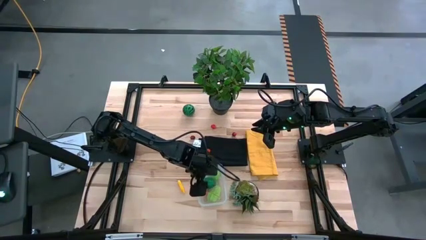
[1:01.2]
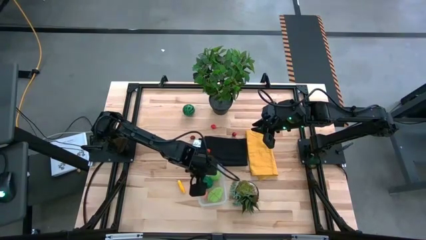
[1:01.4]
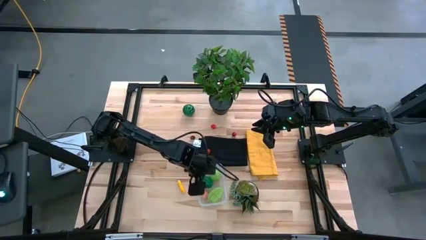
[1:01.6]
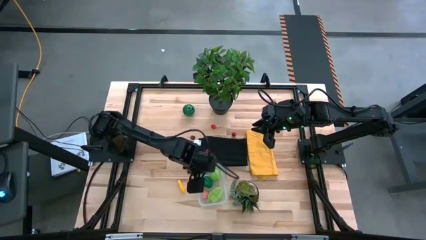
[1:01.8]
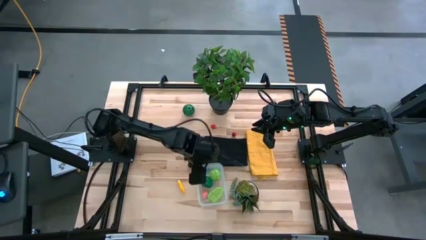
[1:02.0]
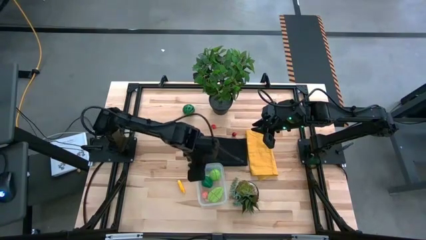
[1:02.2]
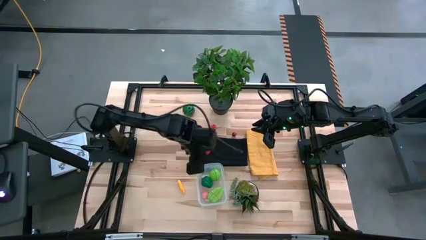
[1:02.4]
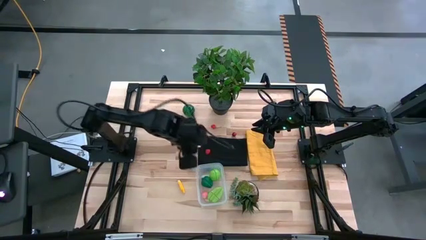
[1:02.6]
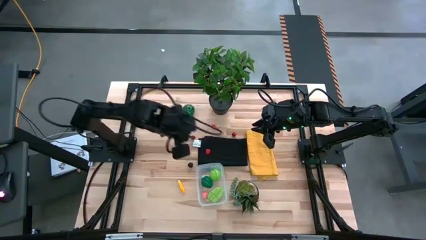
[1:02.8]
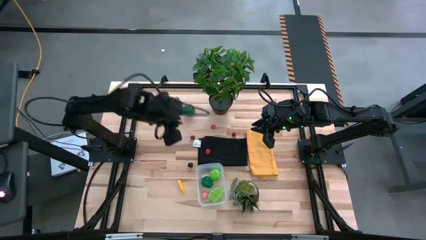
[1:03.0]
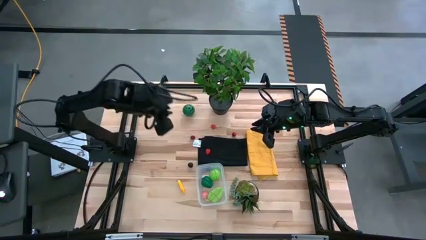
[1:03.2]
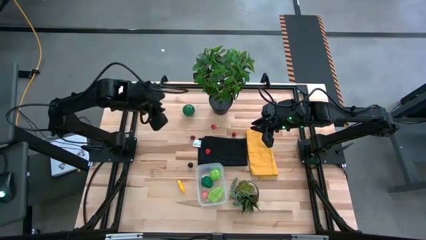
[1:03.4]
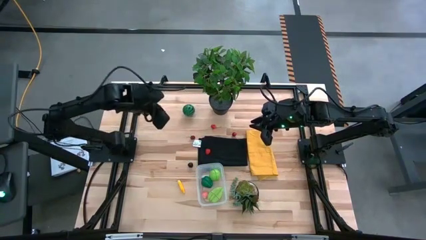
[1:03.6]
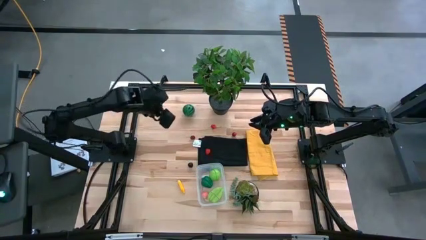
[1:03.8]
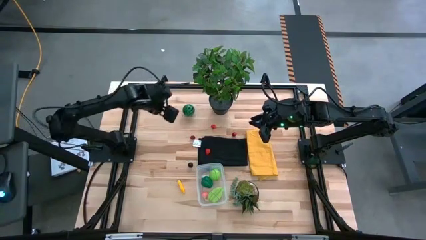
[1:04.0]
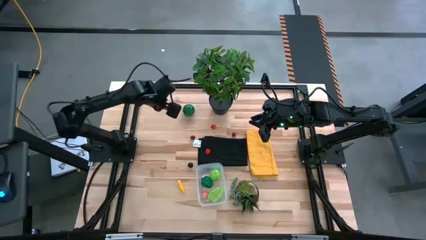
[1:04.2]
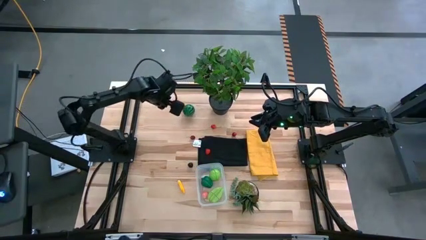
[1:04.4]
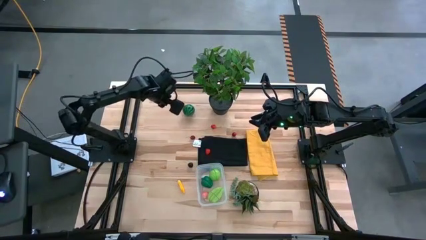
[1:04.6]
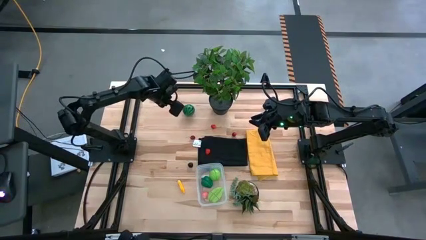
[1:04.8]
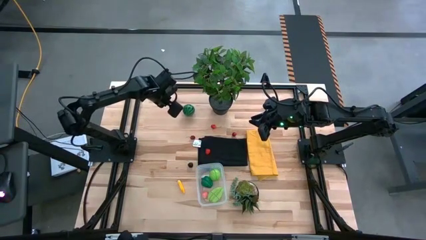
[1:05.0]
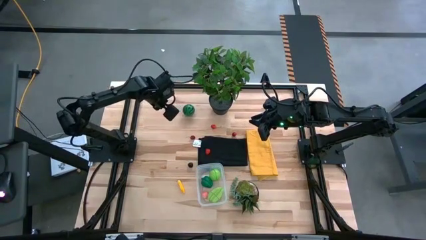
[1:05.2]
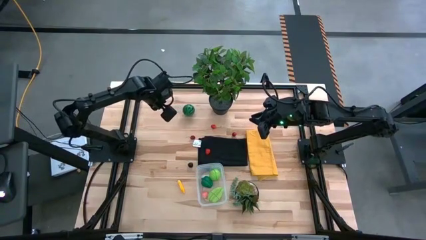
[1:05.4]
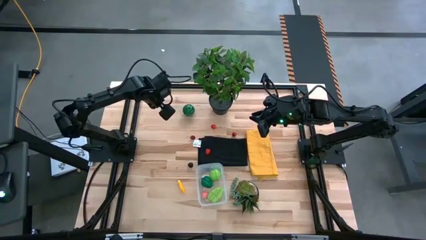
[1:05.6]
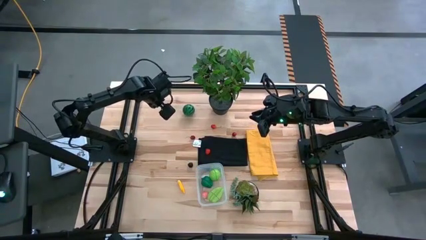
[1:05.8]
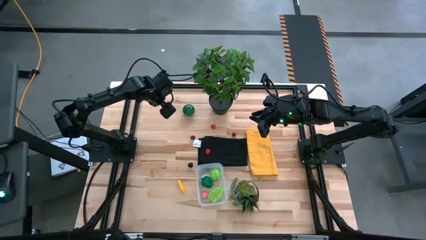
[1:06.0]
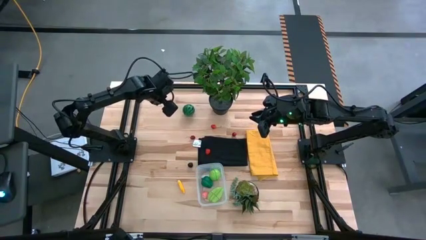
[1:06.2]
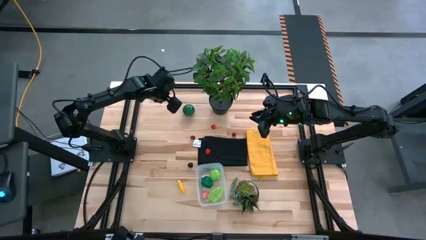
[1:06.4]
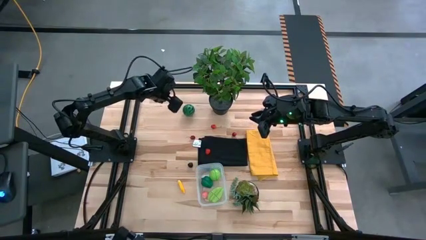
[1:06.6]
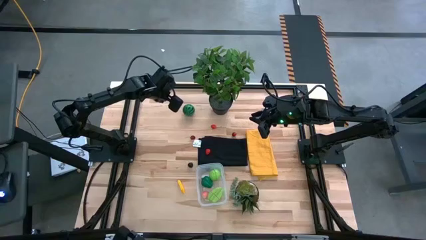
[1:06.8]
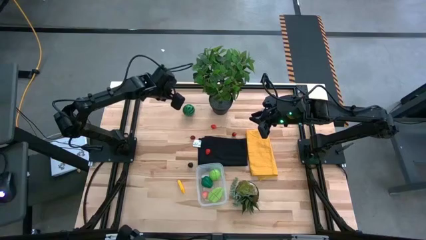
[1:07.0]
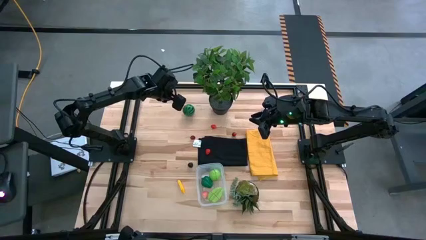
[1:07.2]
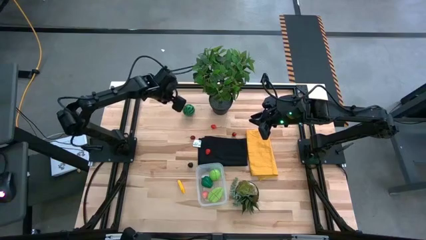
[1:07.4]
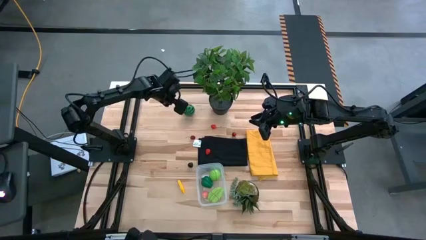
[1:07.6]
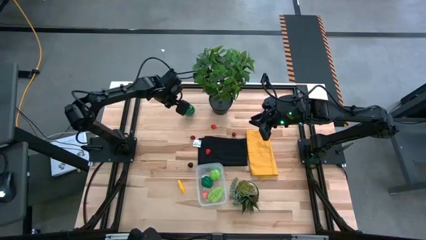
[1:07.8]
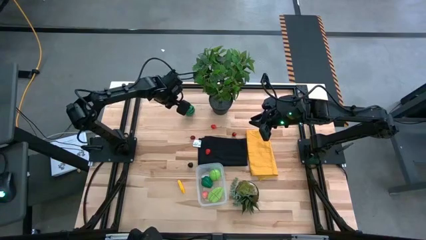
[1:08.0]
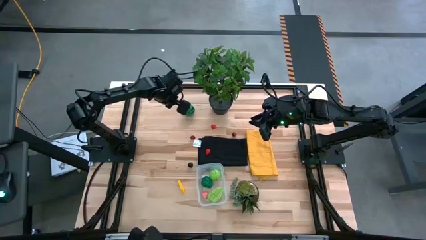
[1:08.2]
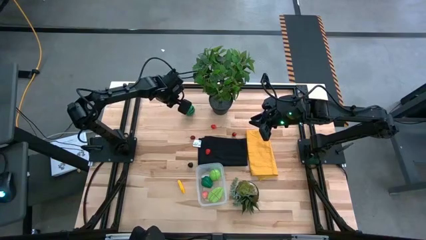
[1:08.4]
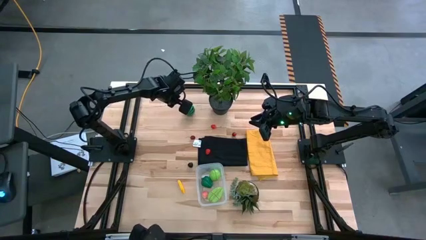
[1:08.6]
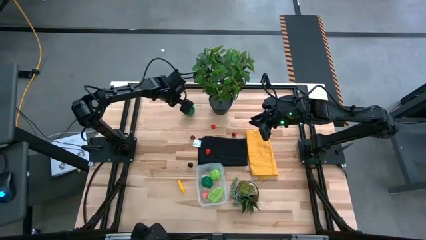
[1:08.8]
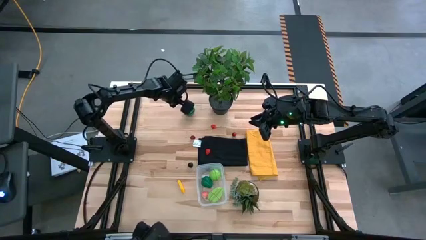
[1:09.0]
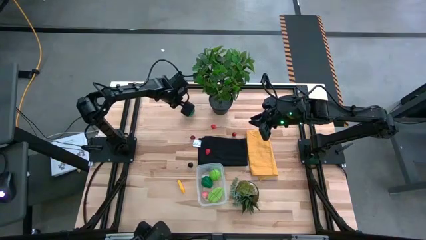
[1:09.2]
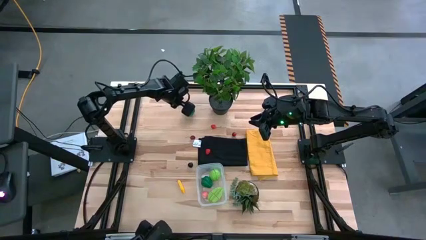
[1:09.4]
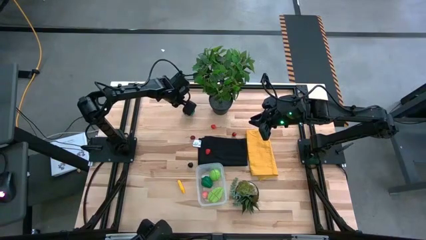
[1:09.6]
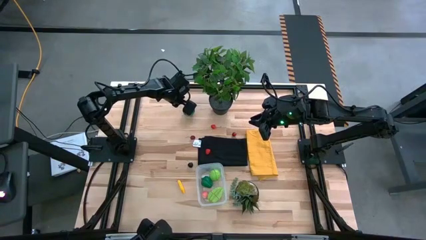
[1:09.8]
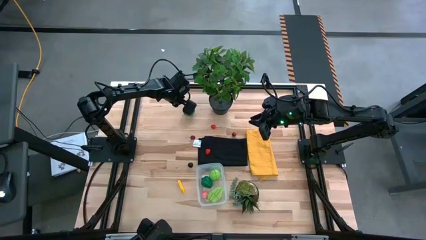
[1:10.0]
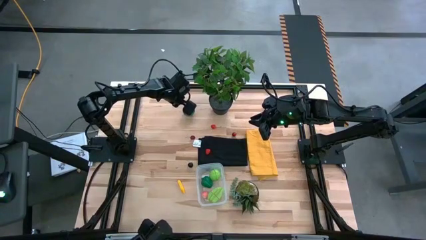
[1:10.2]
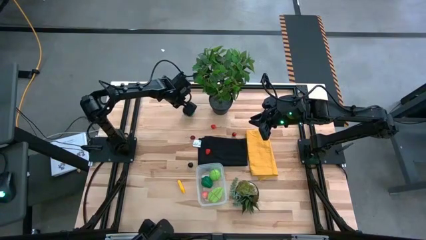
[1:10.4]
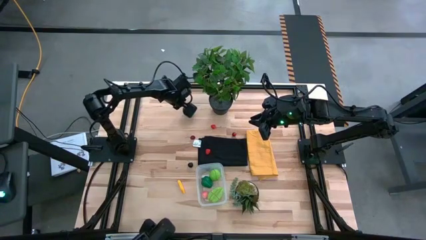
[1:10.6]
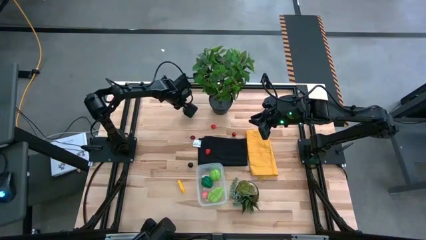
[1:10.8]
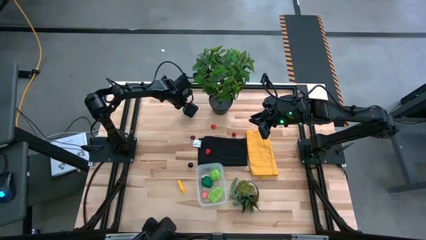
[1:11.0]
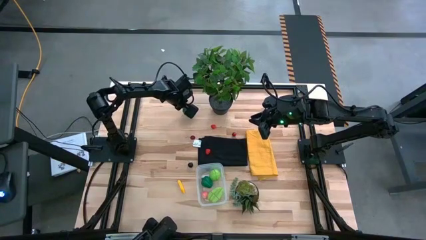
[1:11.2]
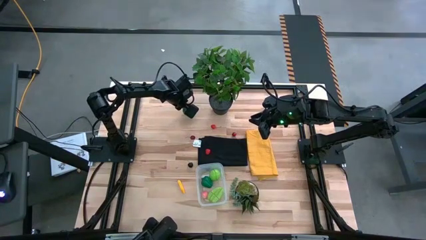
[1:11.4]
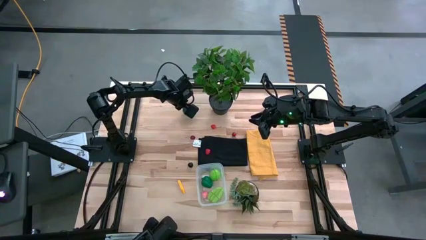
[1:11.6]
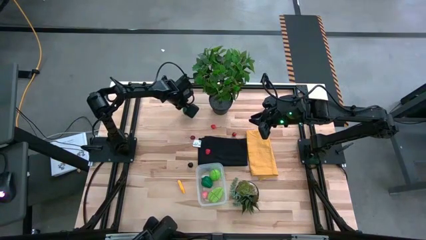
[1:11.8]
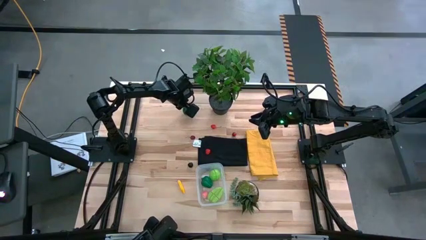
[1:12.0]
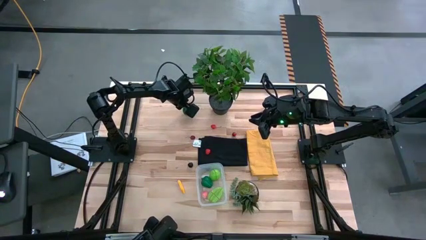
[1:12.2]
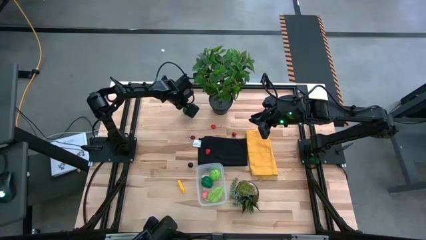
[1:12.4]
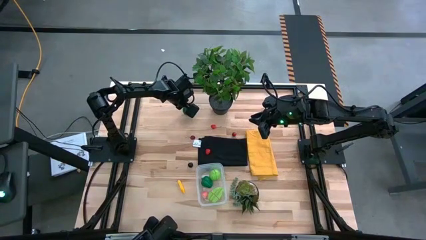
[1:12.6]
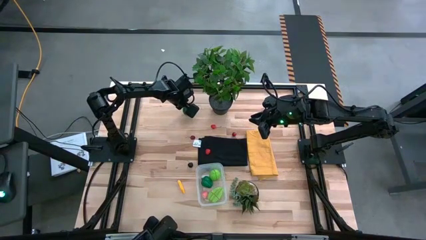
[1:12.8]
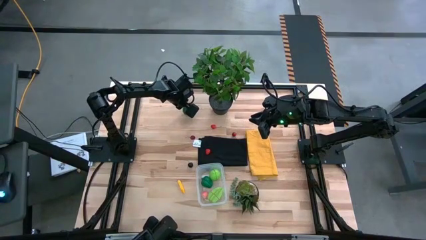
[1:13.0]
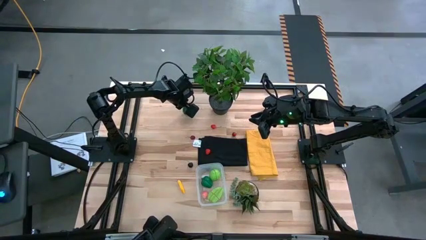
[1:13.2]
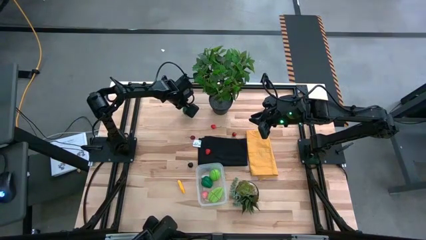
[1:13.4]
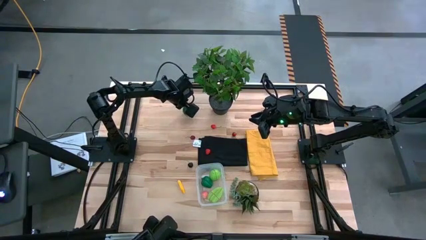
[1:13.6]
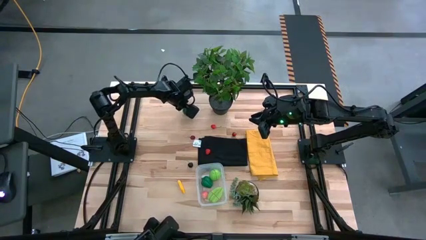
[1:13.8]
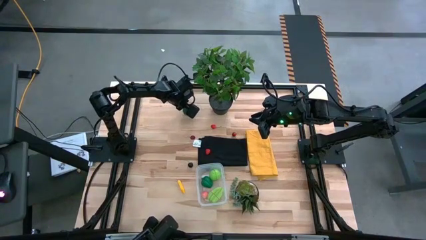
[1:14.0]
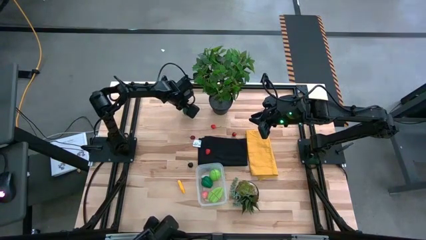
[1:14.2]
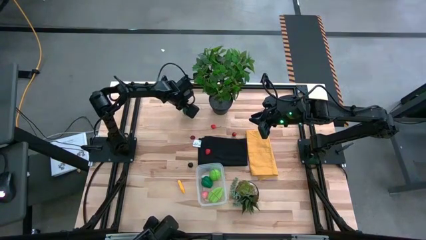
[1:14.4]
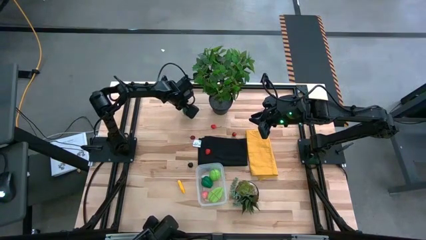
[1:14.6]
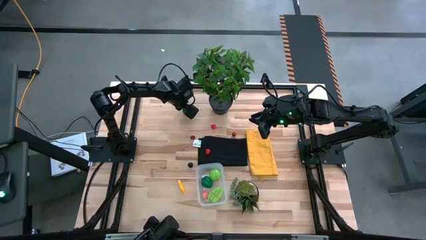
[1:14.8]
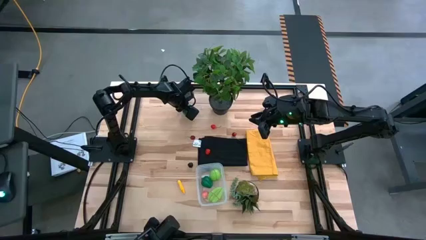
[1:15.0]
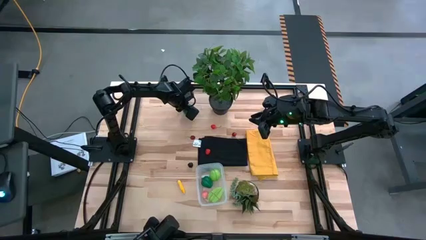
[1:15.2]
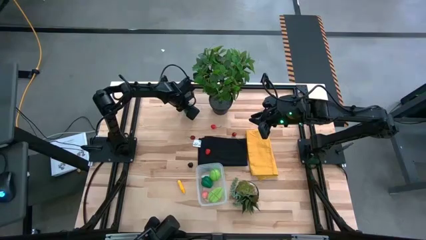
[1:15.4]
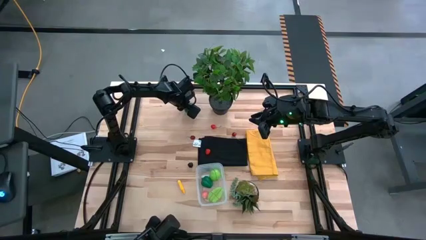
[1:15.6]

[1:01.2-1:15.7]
Task: Pick and placing Produce into tupperware
Put the watermelon into the bin

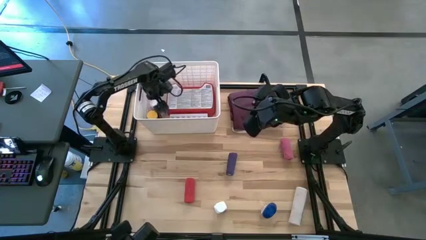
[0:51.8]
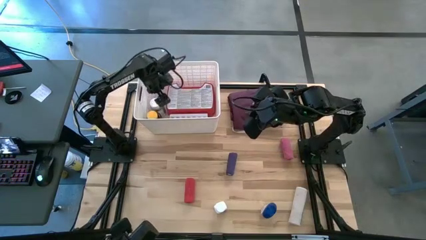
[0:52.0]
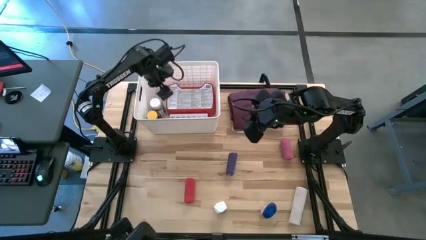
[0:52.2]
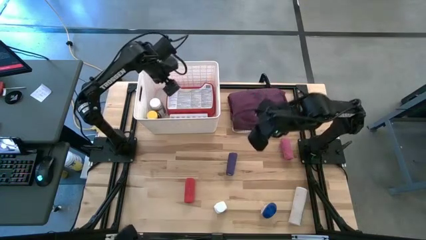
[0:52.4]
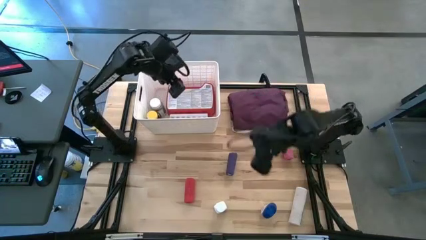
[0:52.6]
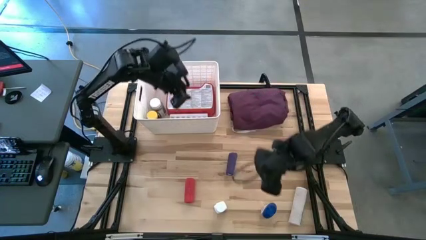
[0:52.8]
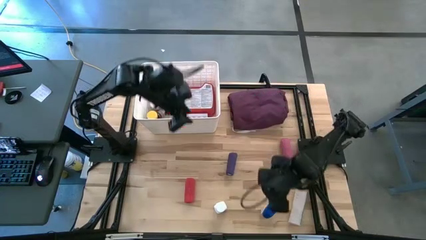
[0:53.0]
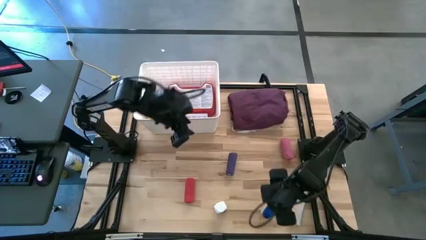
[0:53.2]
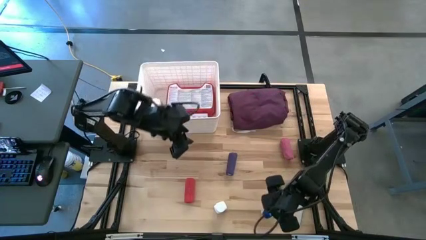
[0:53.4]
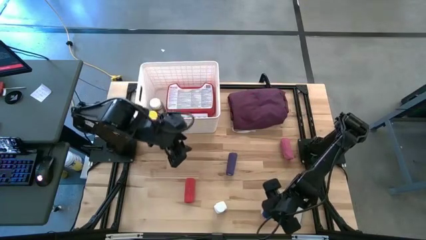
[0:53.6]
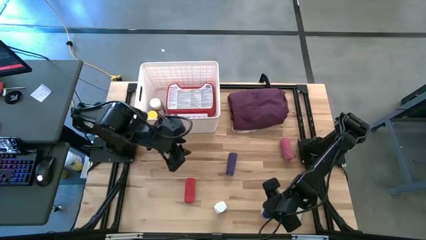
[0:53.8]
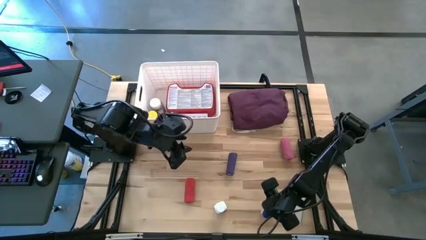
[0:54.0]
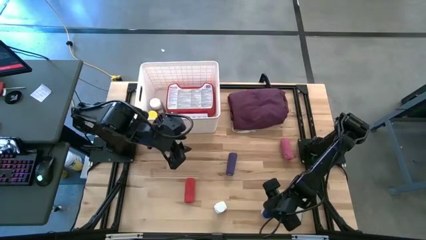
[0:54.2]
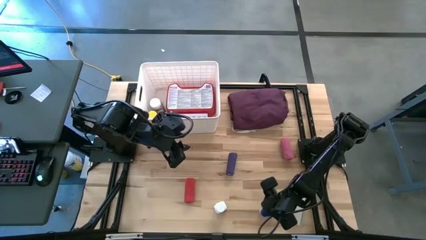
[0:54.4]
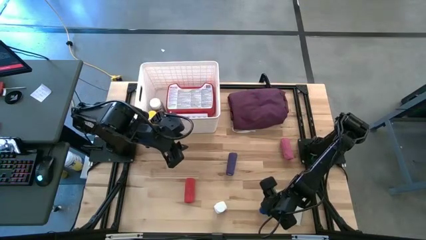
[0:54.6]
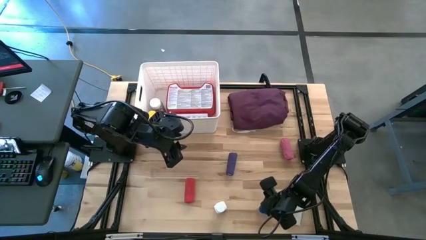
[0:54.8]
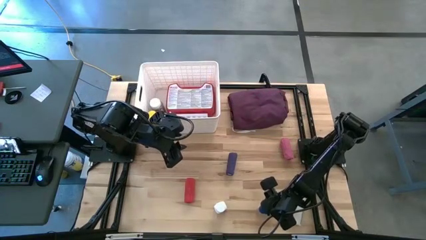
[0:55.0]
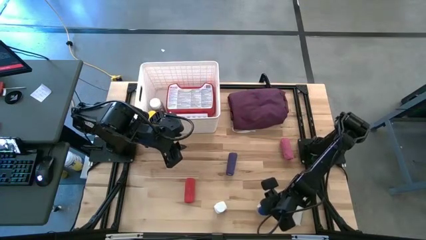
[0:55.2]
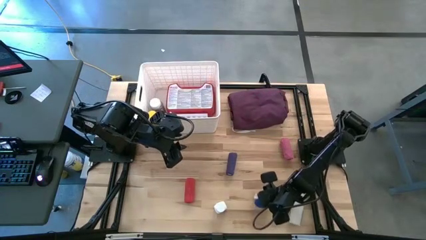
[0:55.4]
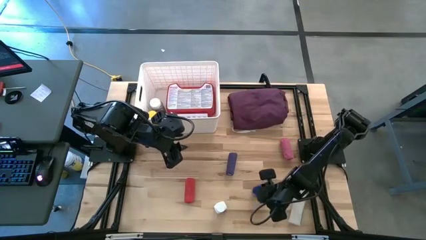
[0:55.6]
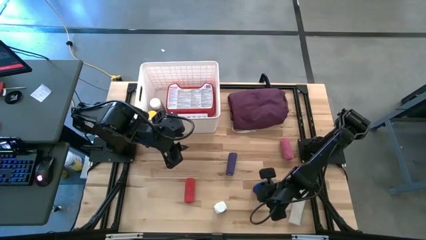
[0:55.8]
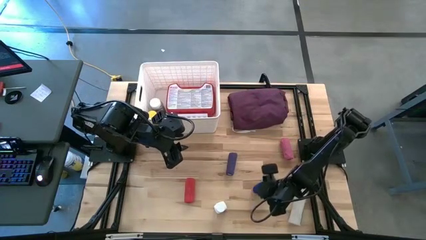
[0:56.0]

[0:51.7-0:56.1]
Task: Pick & place medical supplies in basket/bin
Put the blue pill bottle into the white bin
